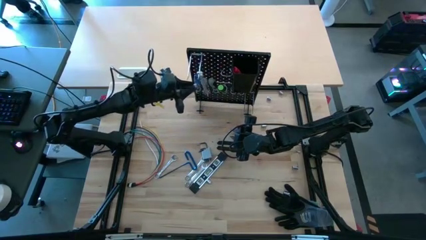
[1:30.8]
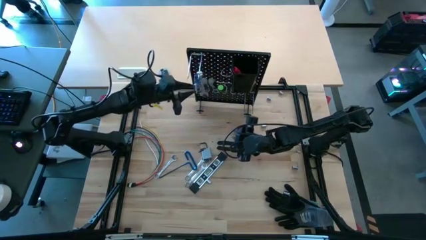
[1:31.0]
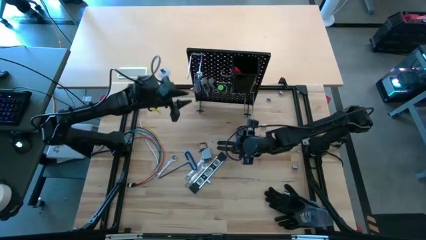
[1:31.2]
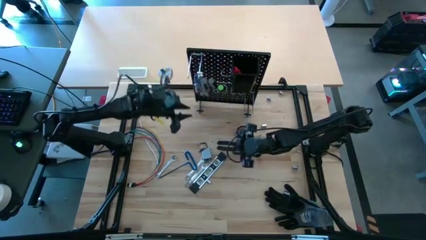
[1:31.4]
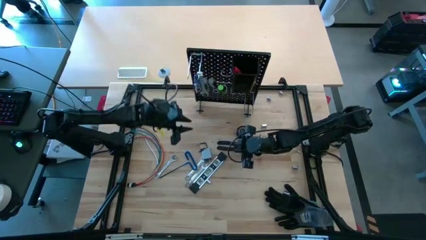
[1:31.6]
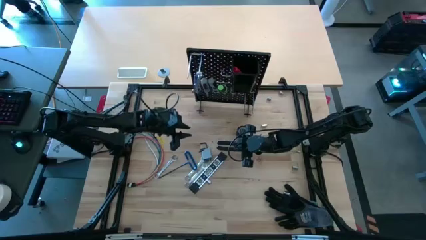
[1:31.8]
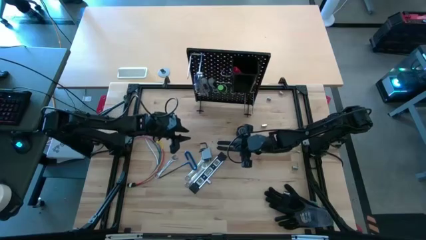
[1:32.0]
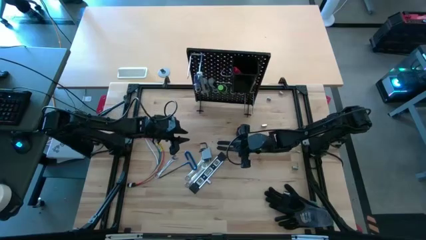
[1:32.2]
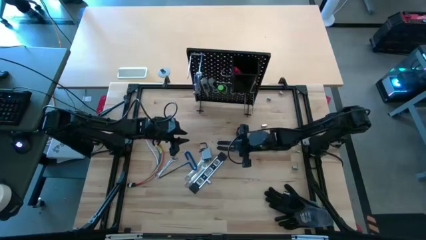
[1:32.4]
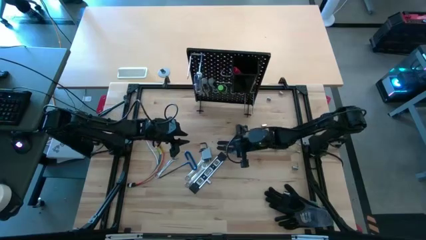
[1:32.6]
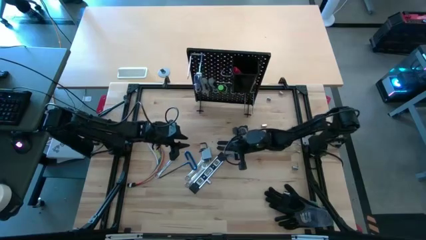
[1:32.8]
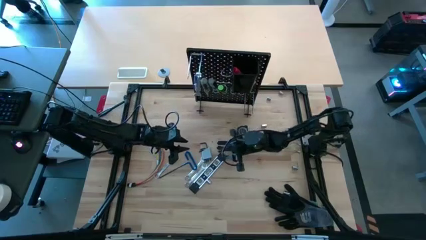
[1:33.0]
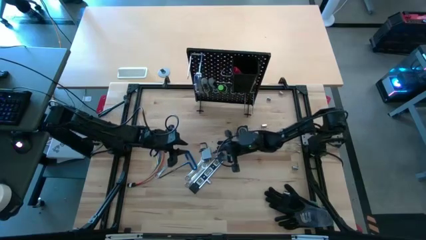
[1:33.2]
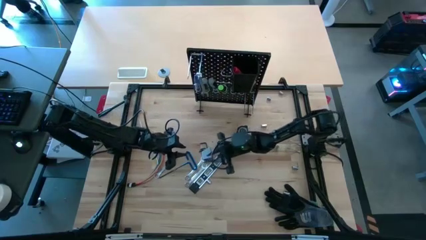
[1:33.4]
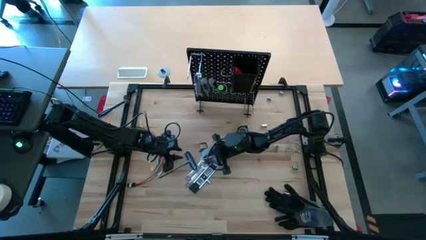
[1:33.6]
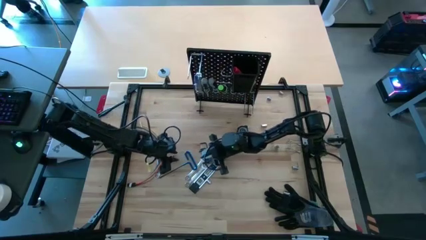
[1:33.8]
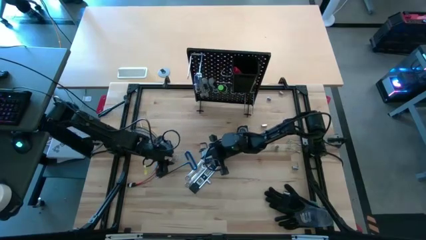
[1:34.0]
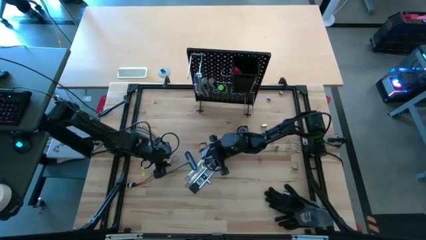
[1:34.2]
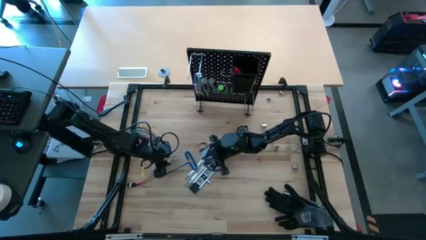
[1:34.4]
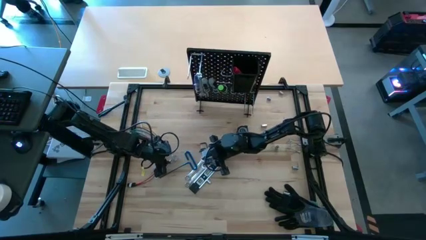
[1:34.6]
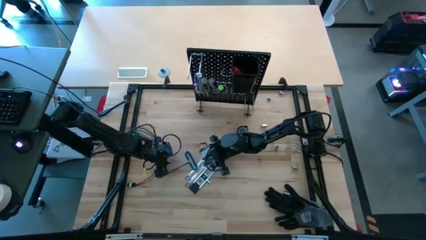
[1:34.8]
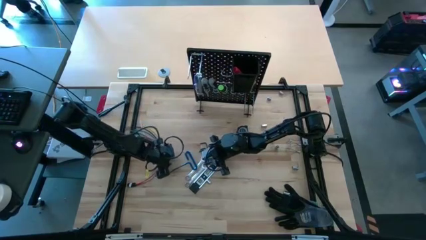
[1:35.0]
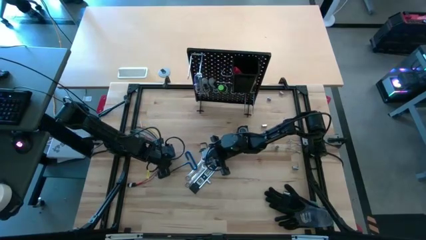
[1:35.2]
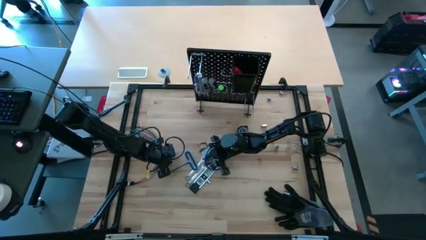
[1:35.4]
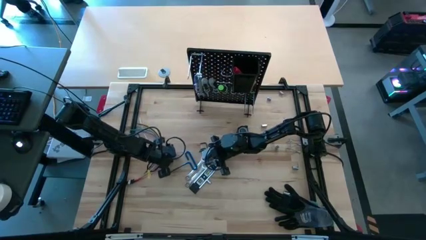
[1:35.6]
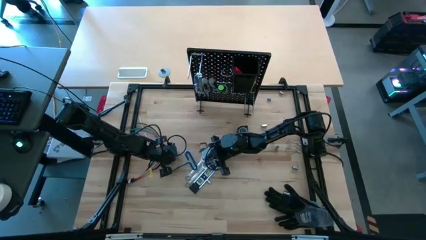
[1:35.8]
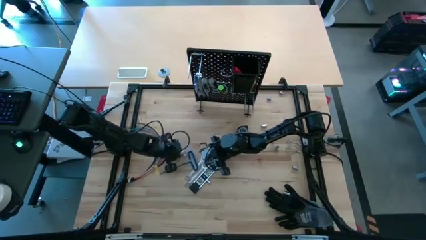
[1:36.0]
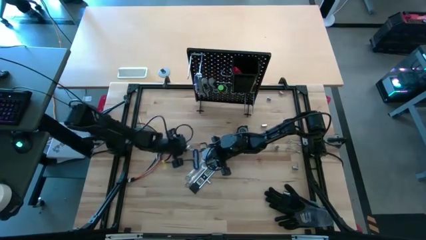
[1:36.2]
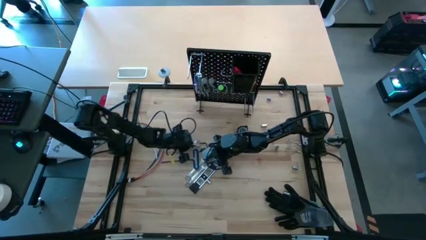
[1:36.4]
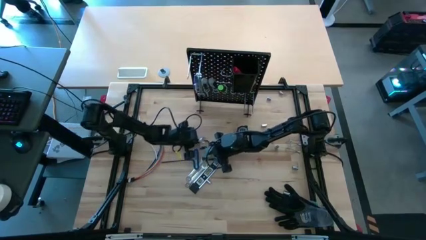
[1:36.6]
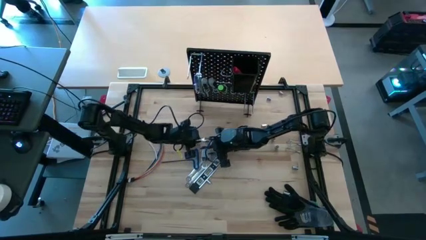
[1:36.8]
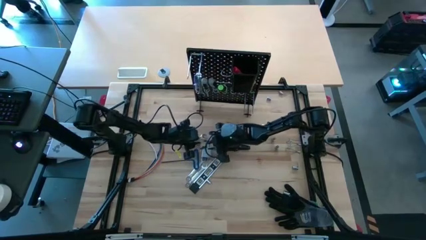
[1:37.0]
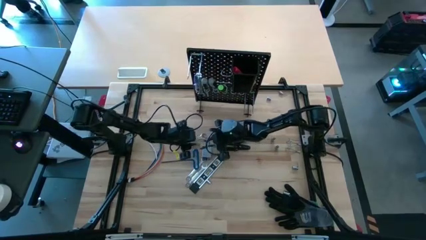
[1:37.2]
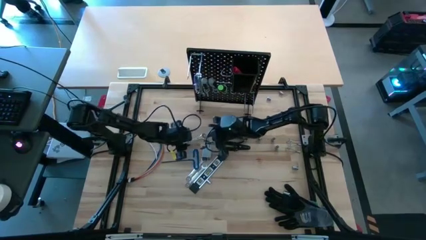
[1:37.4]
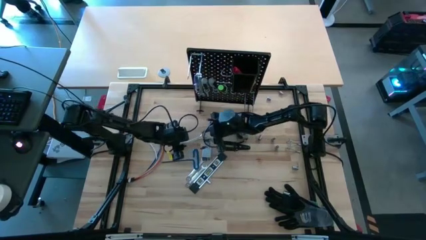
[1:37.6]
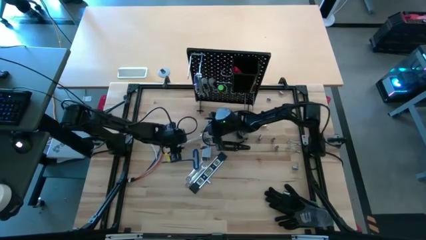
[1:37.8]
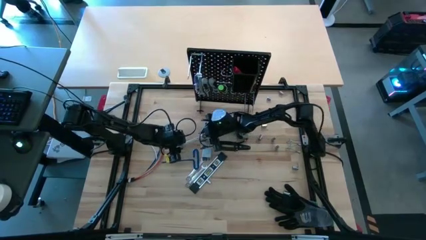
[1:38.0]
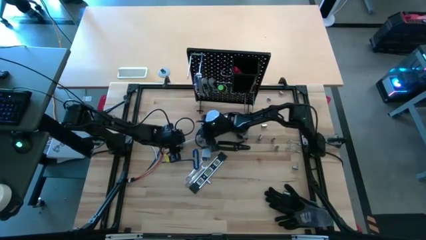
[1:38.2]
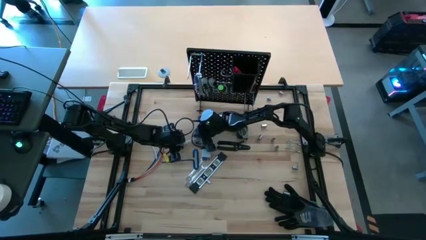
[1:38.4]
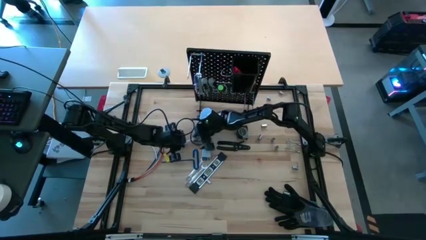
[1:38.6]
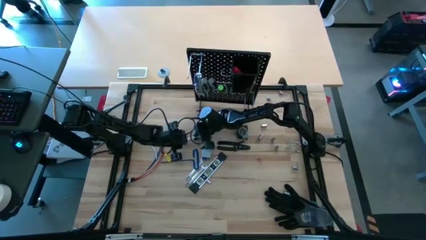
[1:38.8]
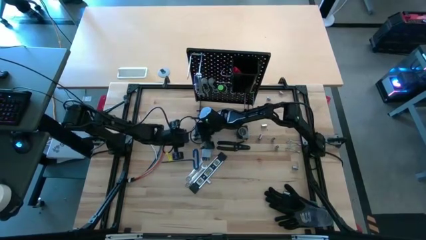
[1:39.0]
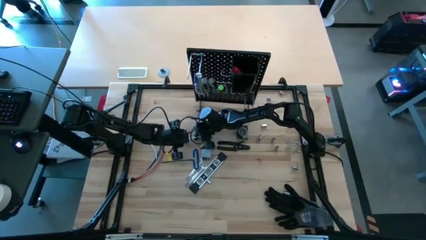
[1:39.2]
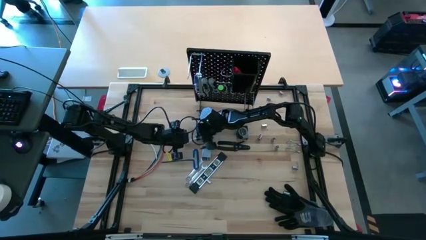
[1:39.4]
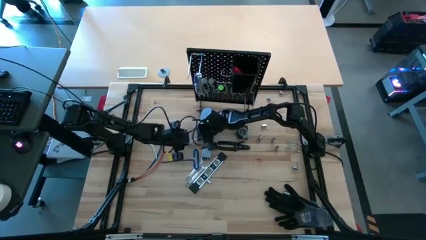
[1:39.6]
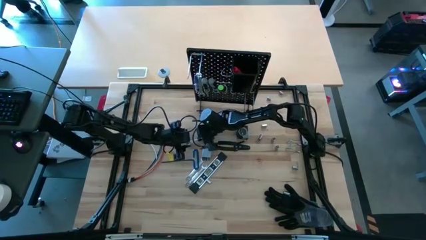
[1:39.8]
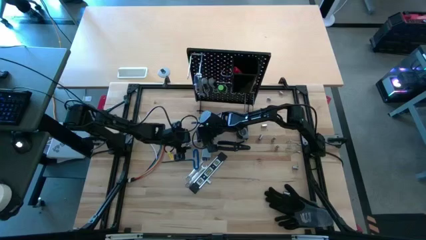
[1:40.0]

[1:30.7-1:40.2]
Task: Hang tools onto peg board
Hang the wrench on the peg board

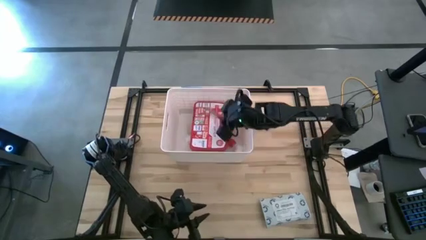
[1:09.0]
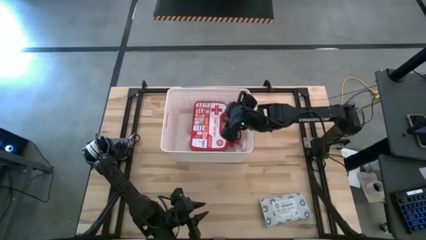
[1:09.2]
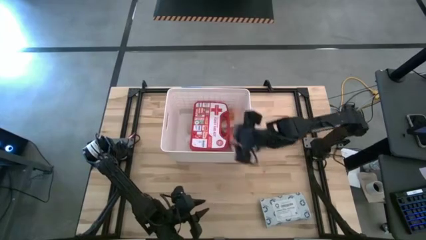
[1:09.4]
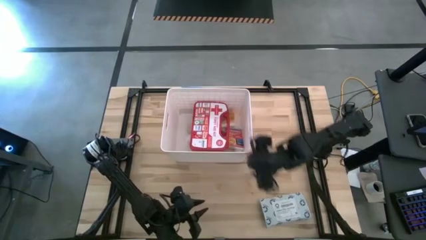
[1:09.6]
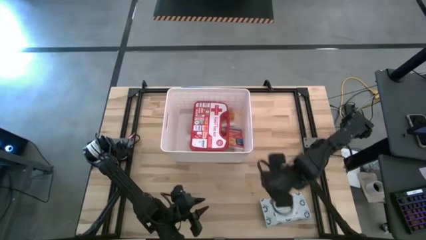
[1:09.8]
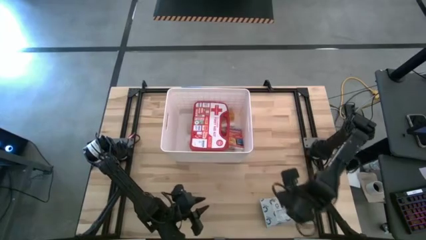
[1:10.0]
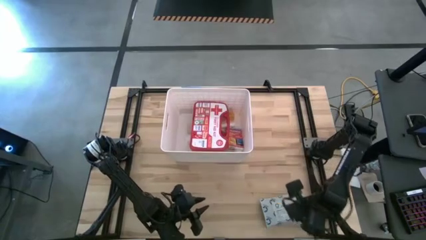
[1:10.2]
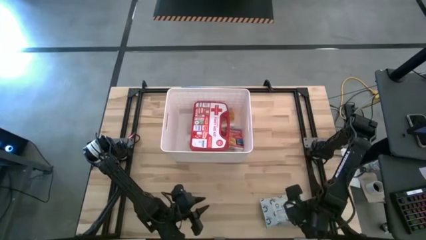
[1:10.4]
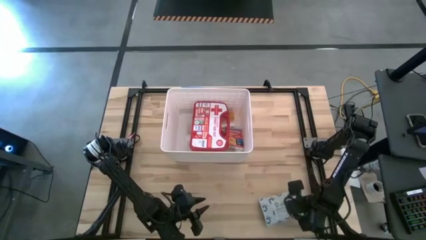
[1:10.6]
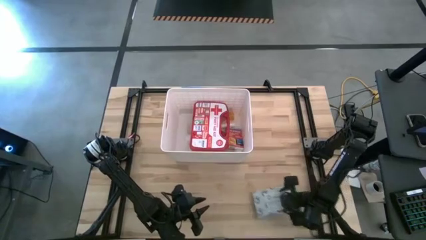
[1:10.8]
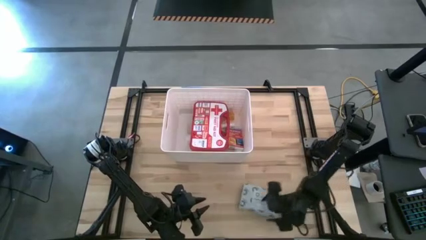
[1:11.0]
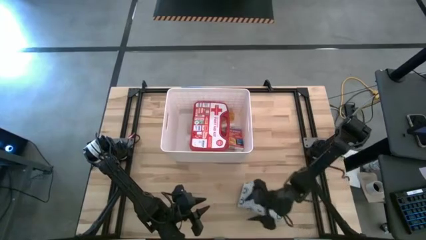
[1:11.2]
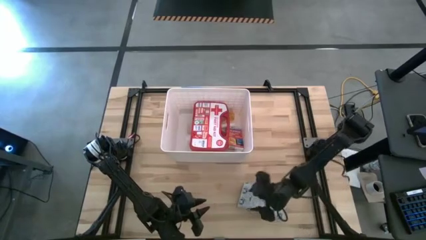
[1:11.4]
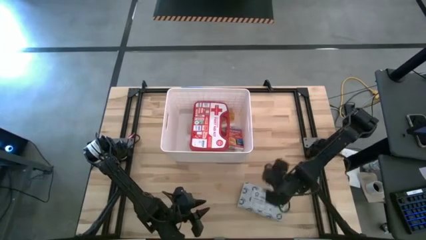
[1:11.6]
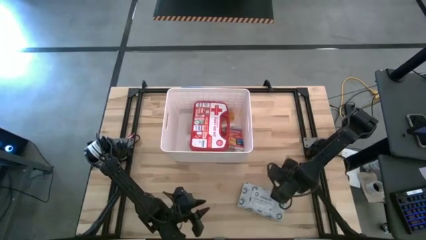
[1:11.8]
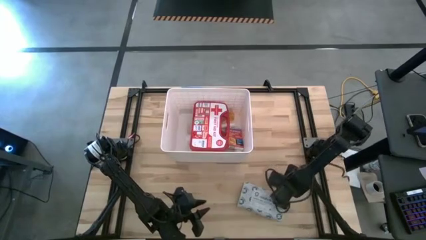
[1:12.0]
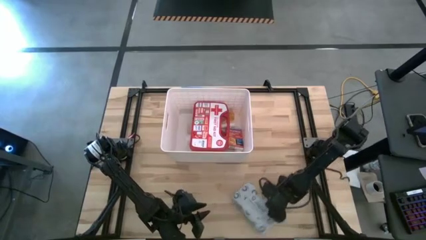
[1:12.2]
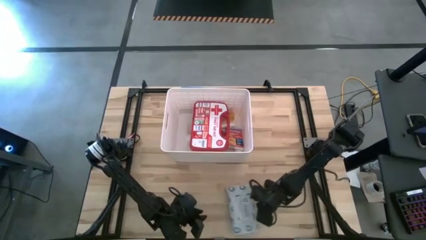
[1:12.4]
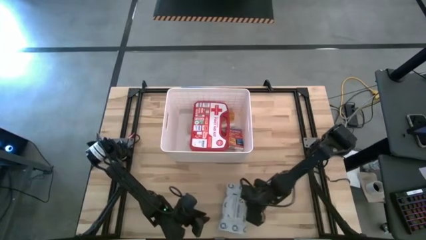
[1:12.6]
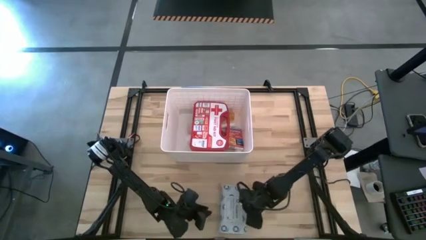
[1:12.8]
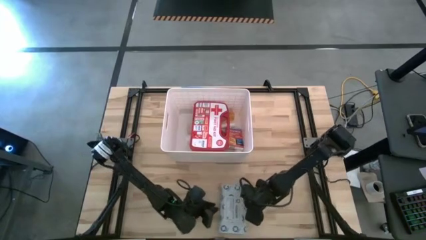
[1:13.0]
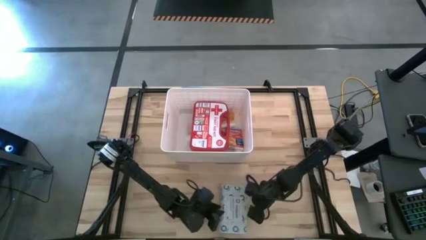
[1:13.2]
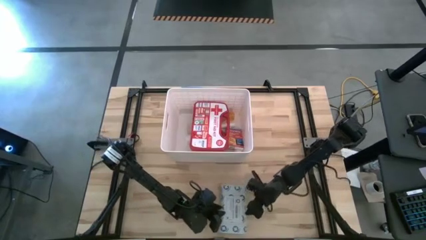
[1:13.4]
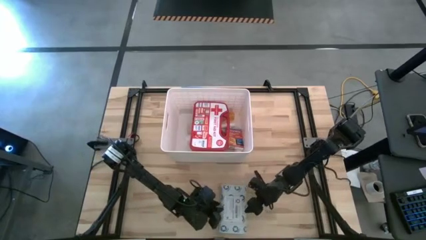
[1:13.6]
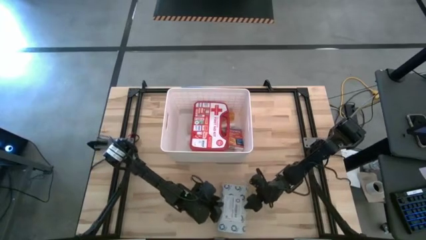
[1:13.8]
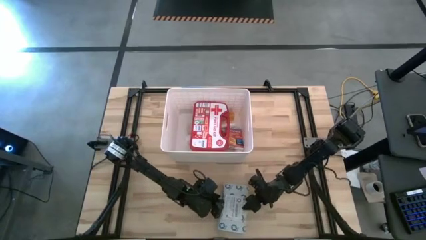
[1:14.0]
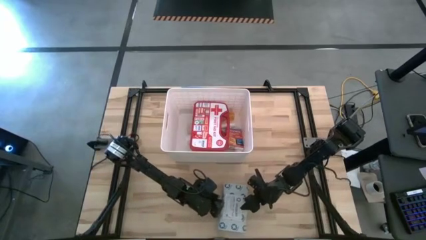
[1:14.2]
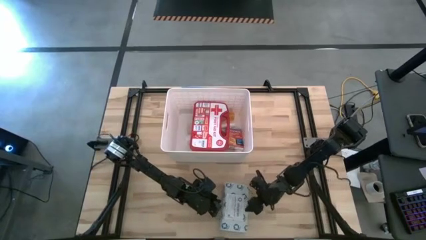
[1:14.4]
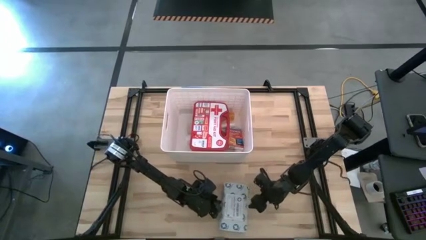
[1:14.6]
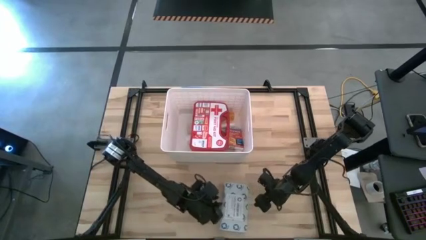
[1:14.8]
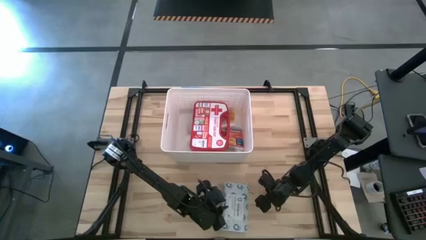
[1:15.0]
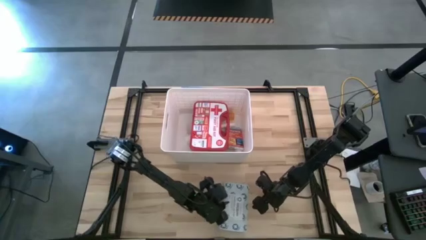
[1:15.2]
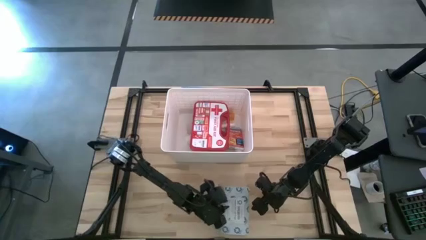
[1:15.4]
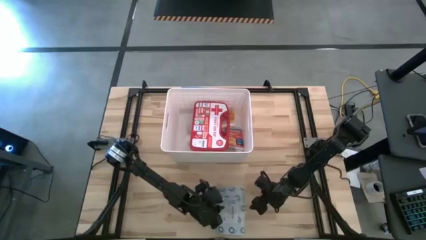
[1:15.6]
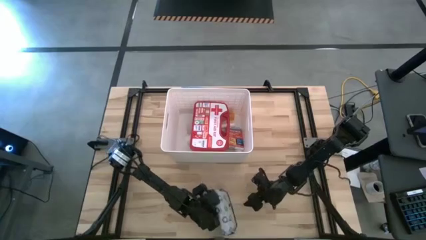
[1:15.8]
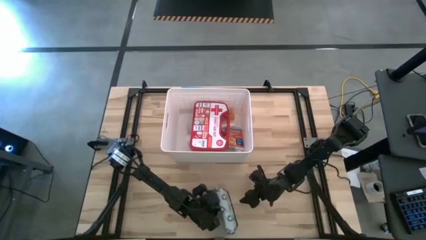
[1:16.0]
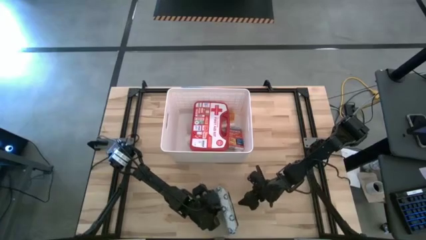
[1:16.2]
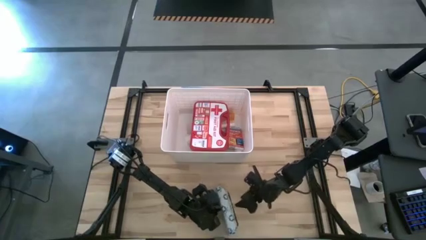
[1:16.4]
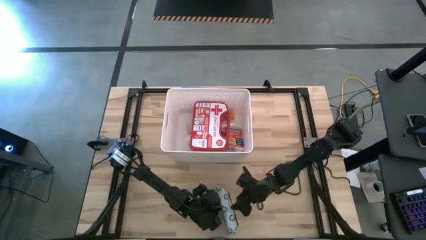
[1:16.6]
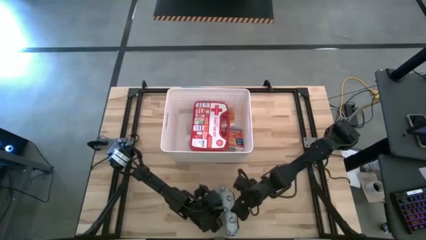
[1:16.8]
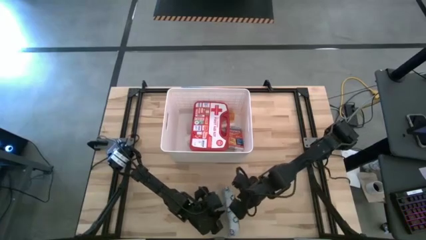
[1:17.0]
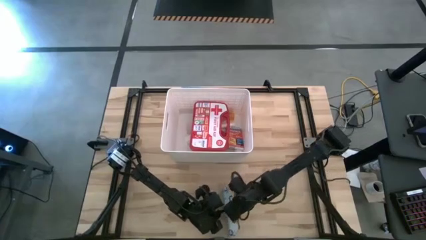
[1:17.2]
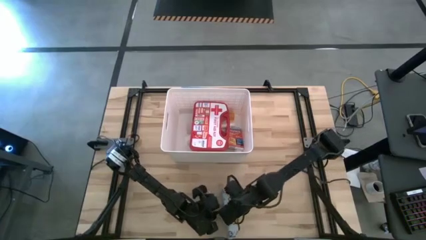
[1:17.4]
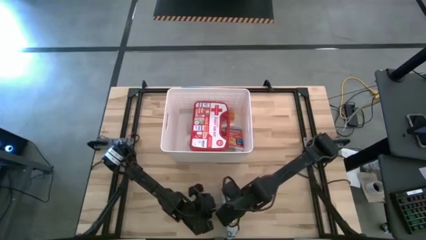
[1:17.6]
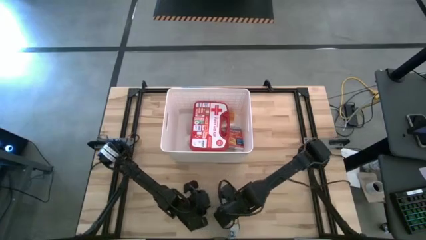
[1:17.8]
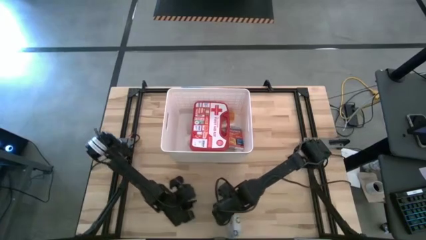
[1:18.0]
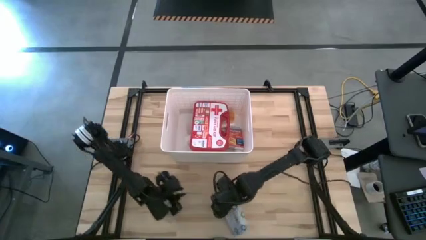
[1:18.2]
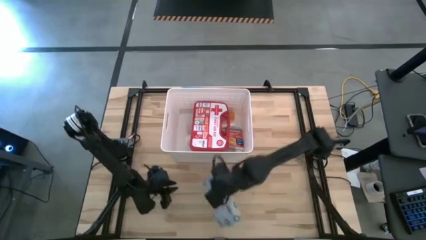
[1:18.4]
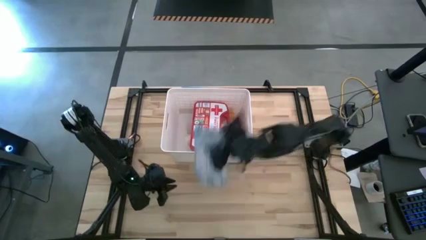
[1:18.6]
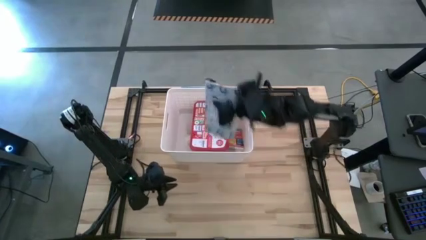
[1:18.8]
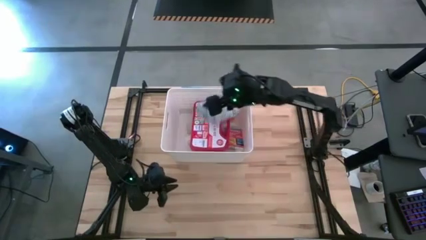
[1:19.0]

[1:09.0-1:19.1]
Task: Pick & place medical supplies in basket/bin
Put the mailer bag into the white basket
